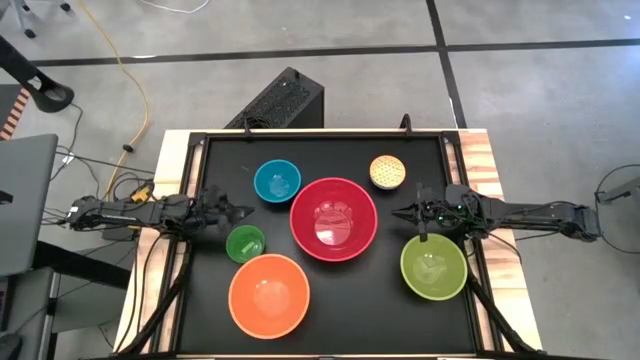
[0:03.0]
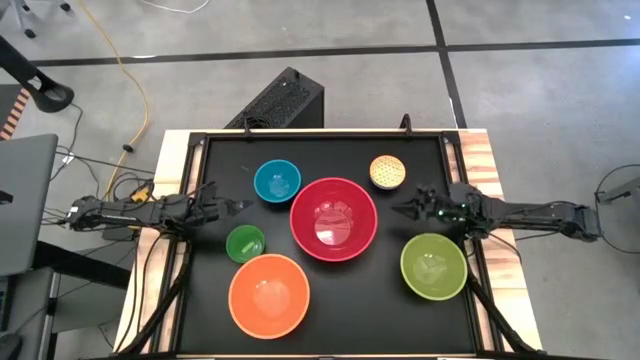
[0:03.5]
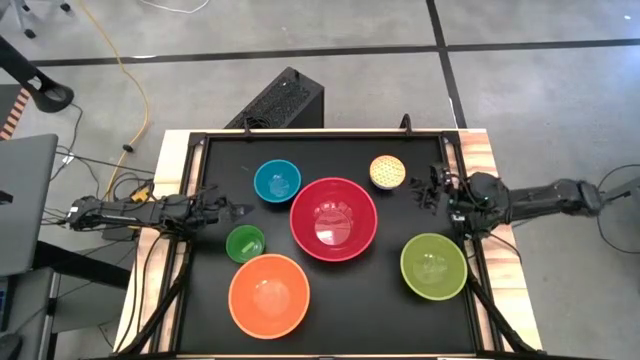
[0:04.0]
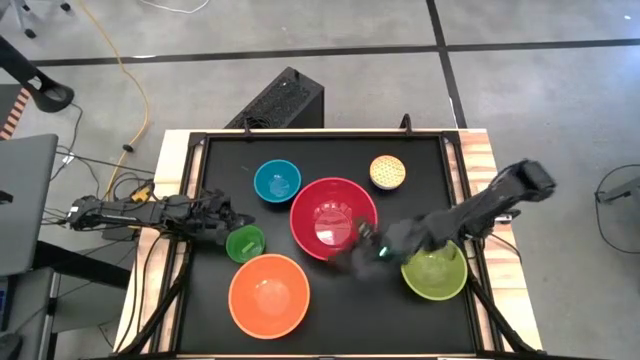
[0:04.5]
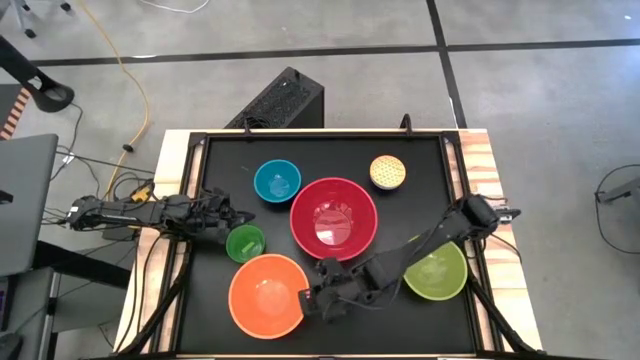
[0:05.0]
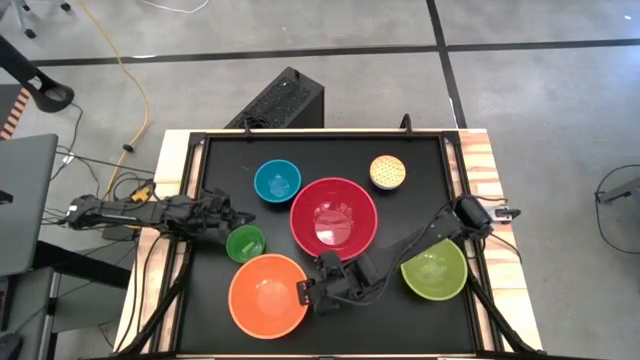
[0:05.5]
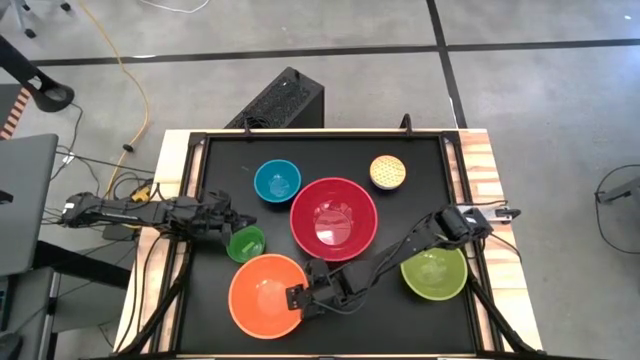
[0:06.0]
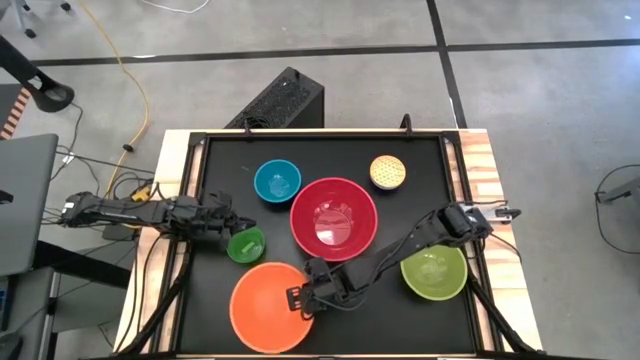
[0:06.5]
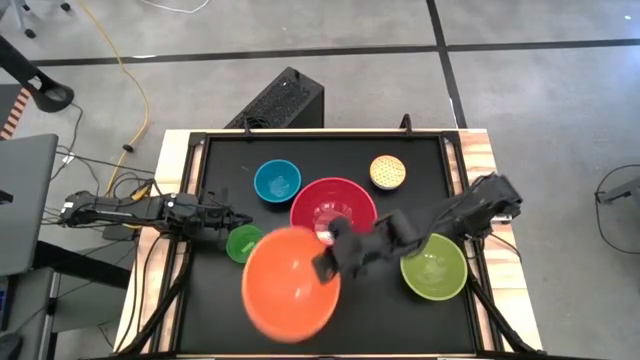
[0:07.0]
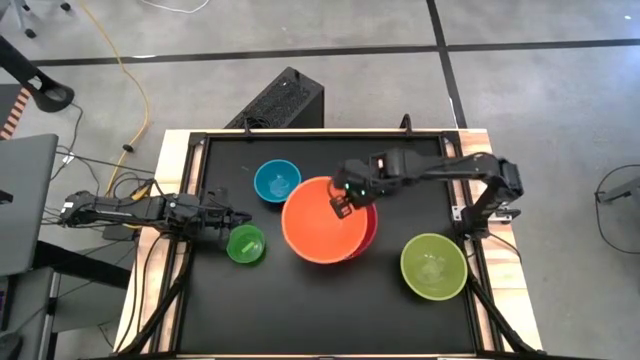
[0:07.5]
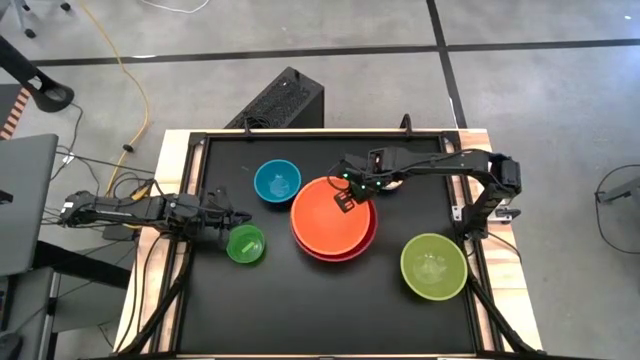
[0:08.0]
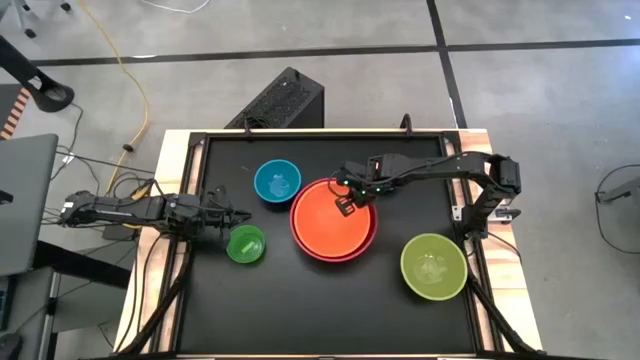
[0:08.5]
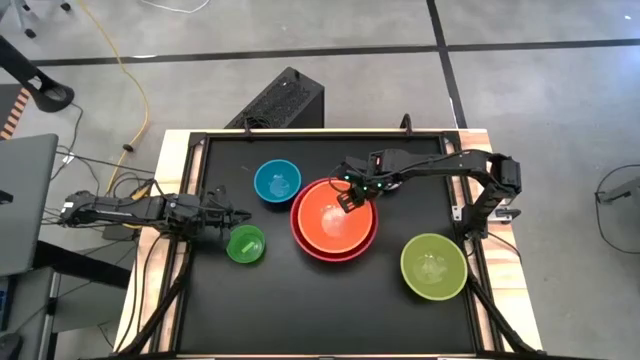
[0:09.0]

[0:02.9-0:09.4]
Stack the orange bowl into the red bowl

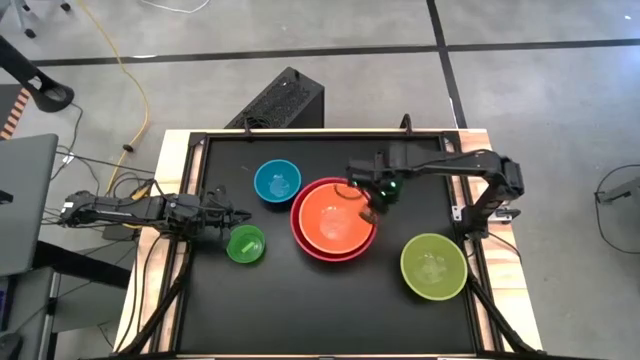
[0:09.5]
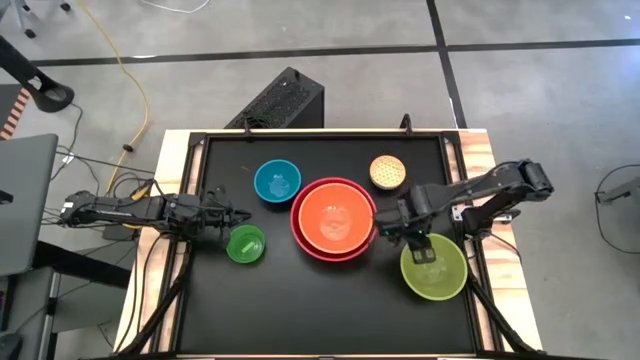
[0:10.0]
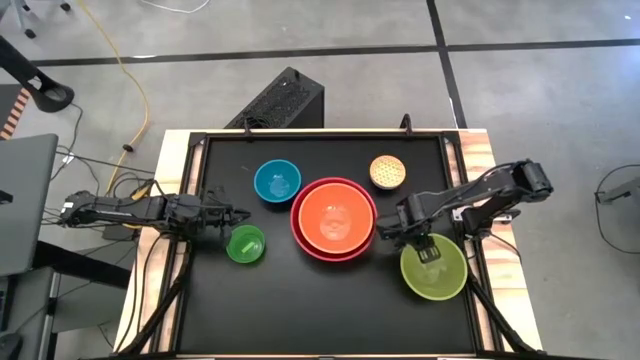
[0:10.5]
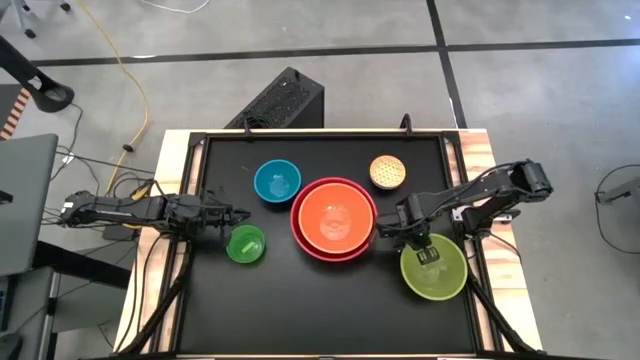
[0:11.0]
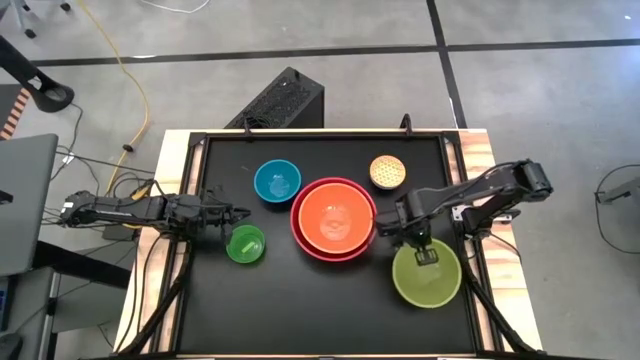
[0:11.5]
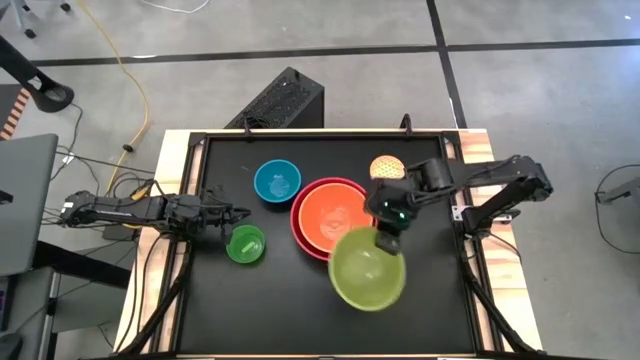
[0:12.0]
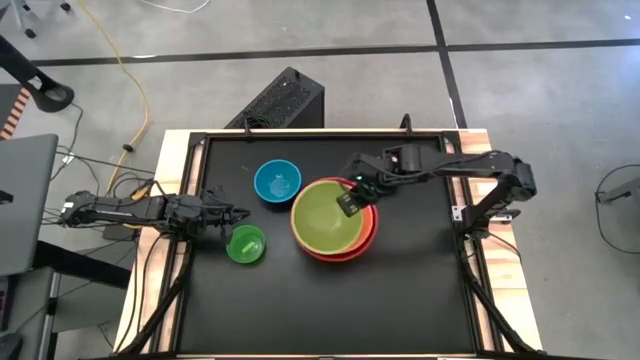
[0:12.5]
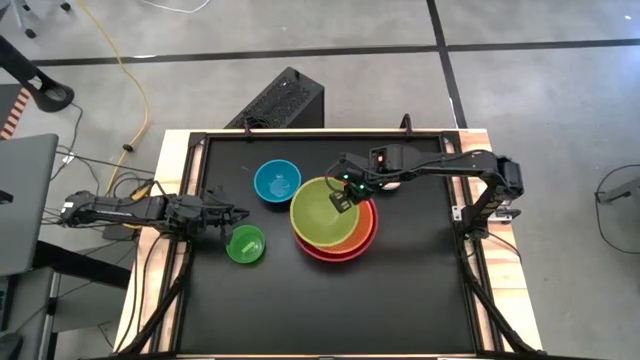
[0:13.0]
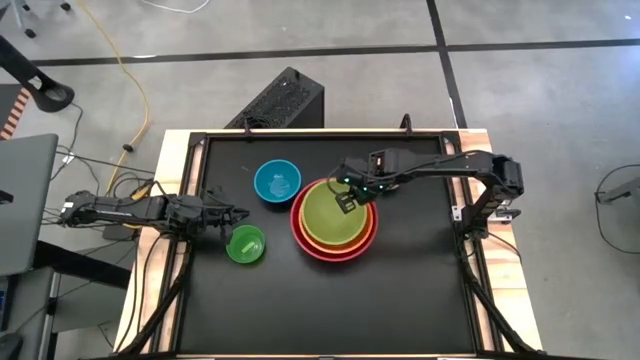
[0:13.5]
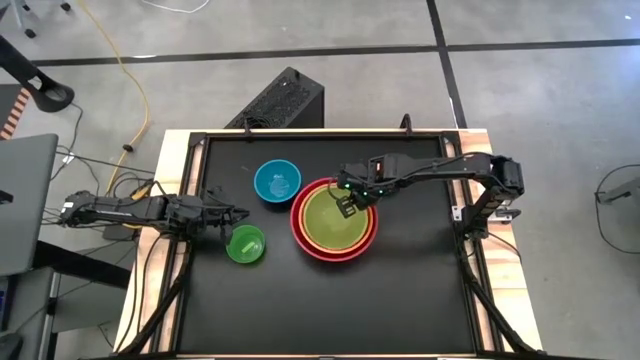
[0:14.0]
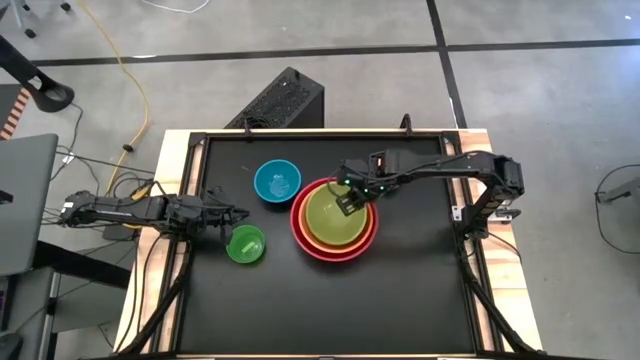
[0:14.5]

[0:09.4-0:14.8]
Stack the green bowl into the orange bowl

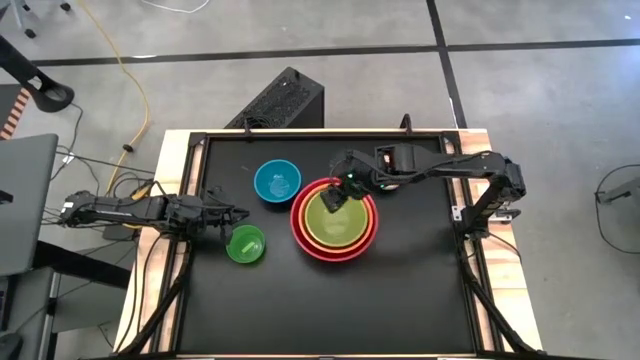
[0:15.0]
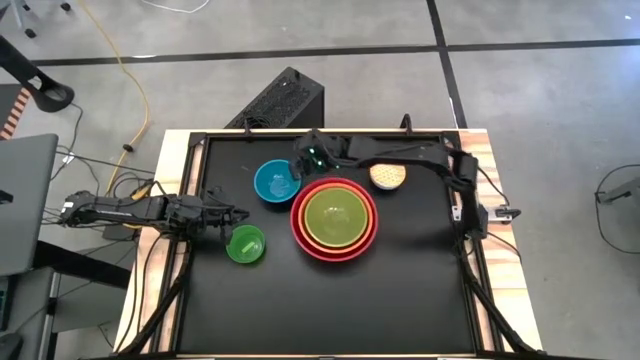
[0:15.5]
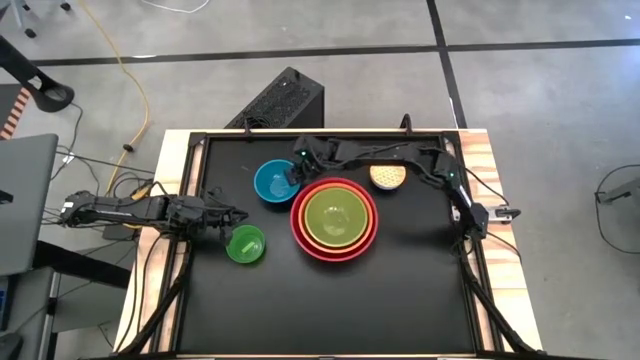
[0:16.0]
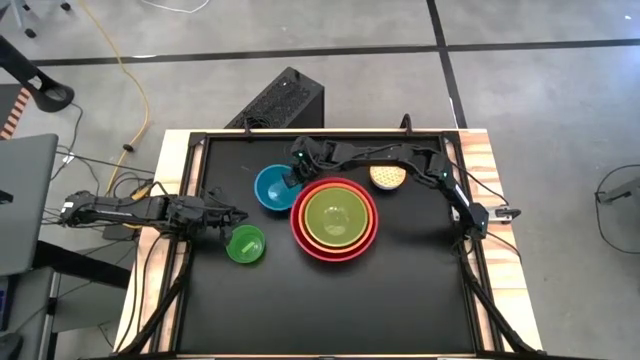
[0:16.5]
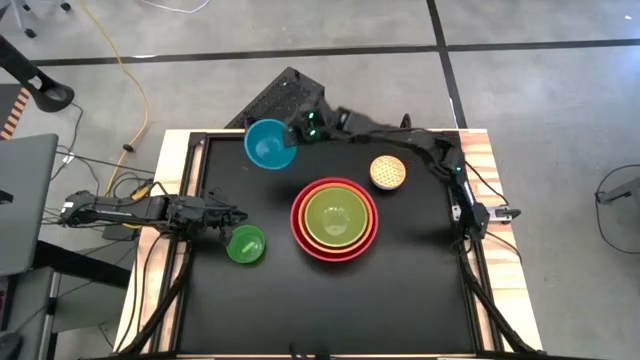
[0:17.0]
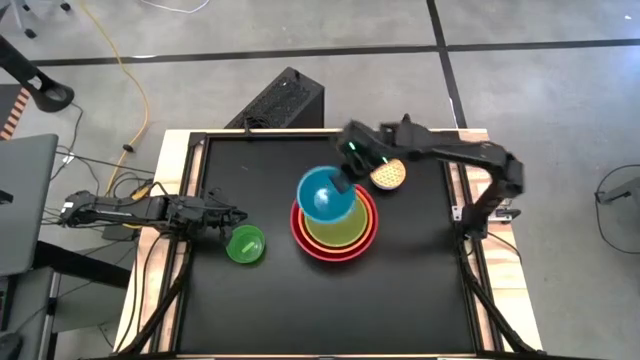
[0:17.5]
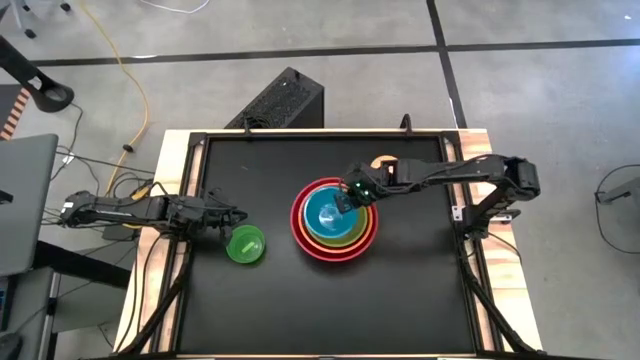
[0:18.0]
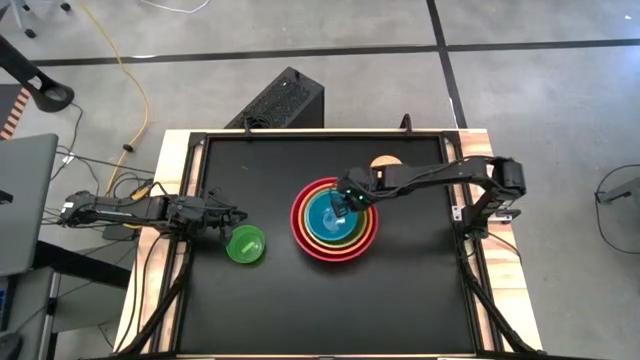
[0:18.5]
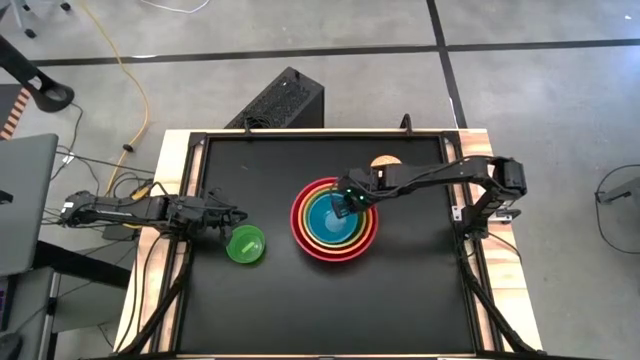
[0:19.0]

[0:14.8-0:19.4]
Stack the blue bowl into the green bowl

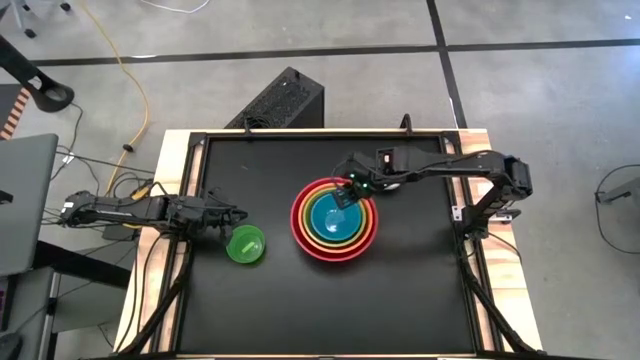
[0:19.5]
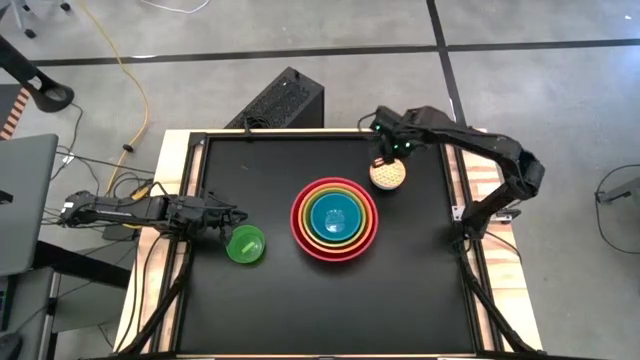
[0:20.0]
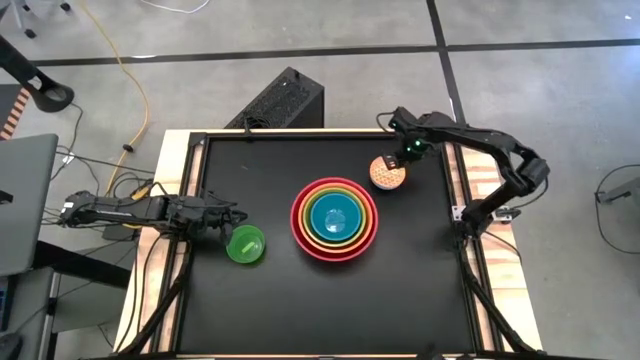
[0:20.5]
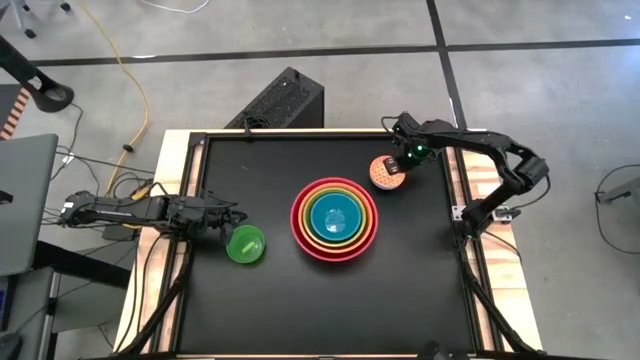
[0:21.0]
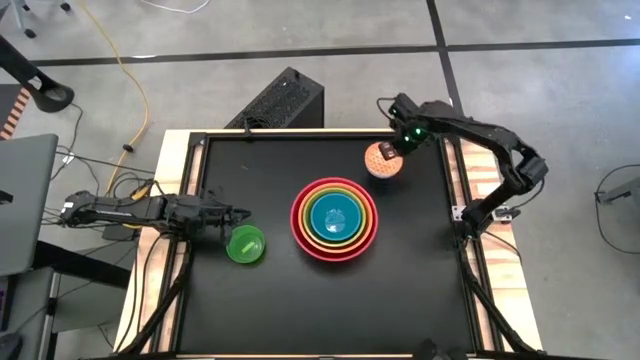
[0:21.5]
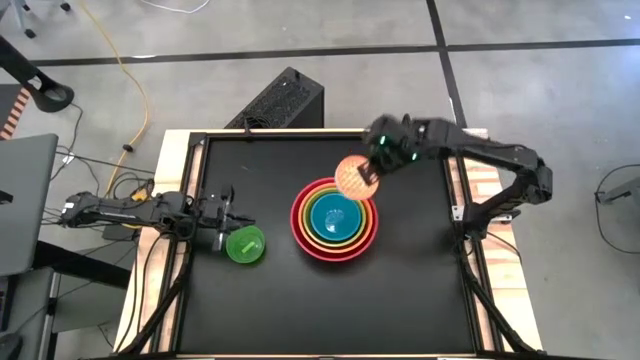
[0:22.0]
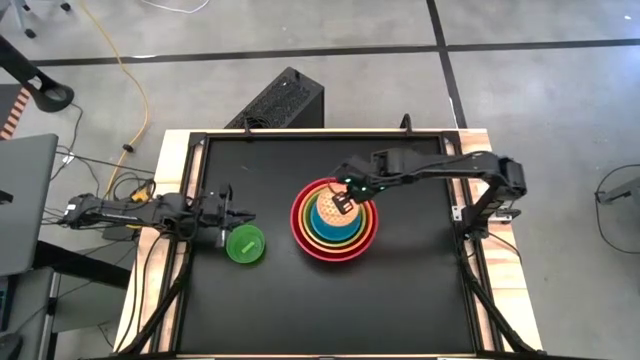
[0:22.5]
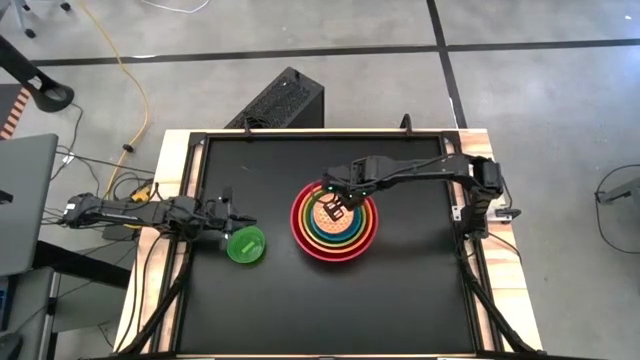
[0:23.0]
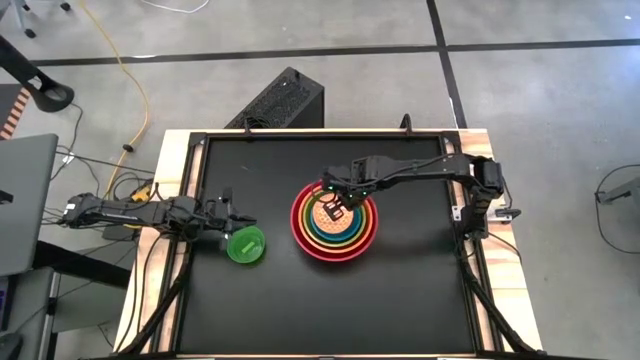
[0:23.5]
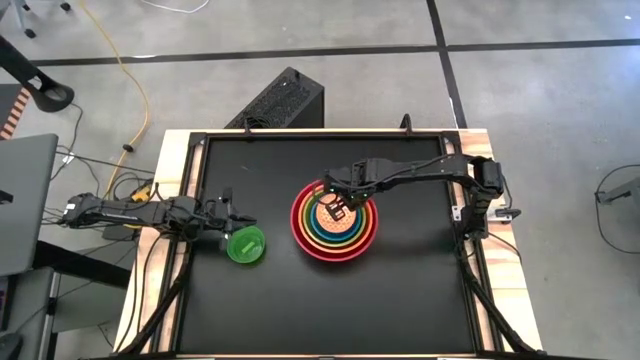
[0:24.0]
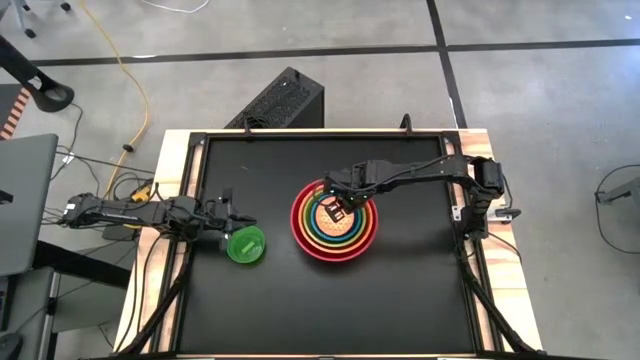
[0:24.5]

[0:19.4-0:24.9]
Stack the orange patterned bowl into the blue bowl
